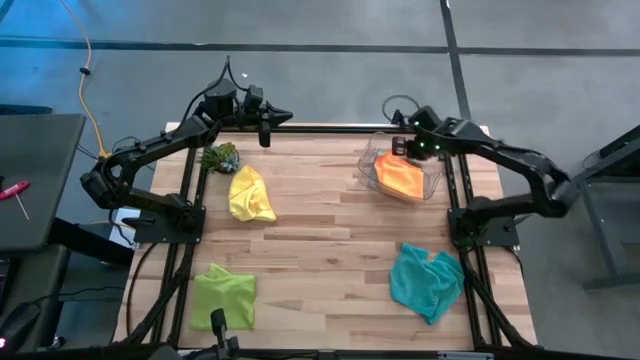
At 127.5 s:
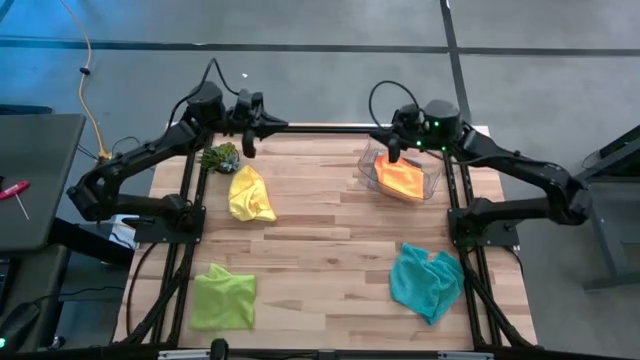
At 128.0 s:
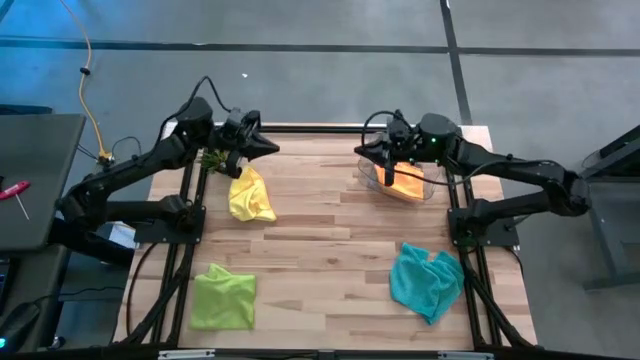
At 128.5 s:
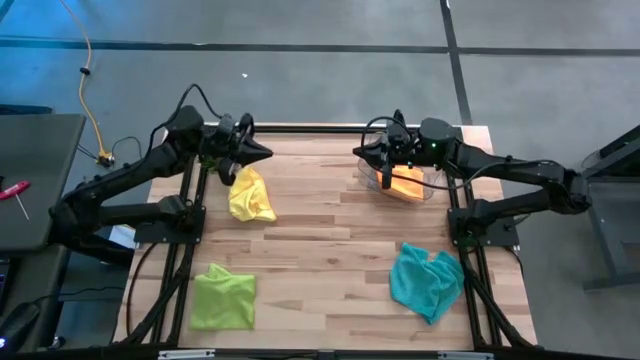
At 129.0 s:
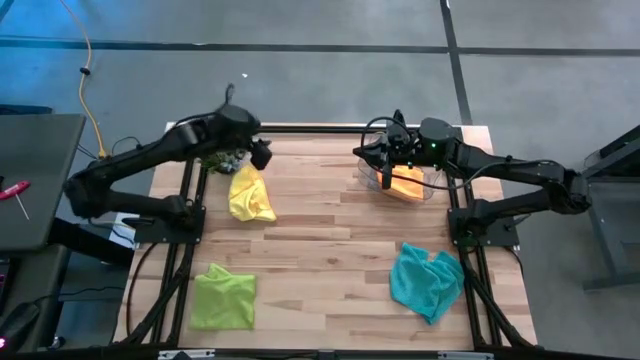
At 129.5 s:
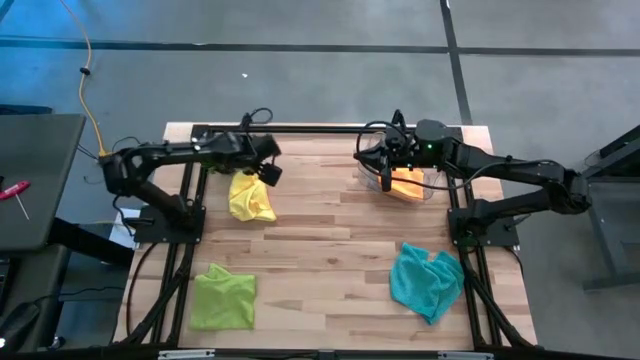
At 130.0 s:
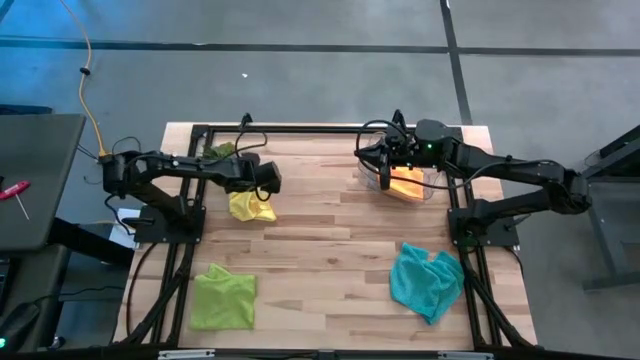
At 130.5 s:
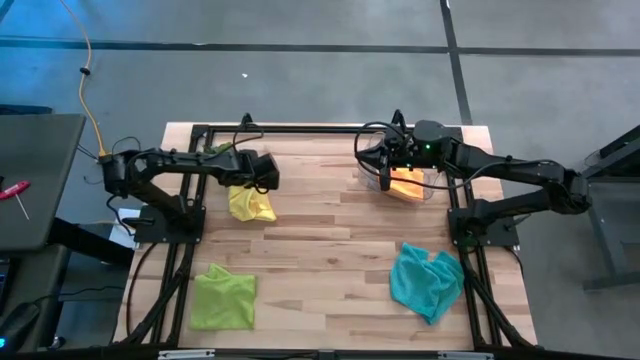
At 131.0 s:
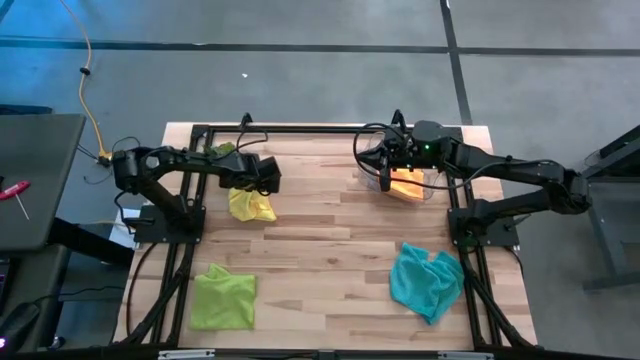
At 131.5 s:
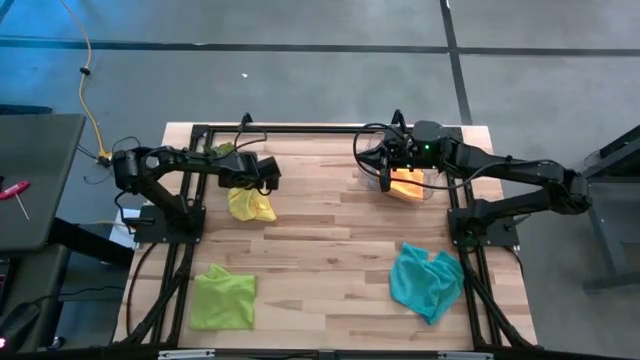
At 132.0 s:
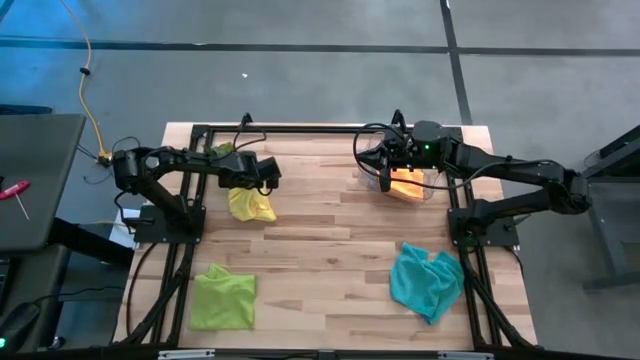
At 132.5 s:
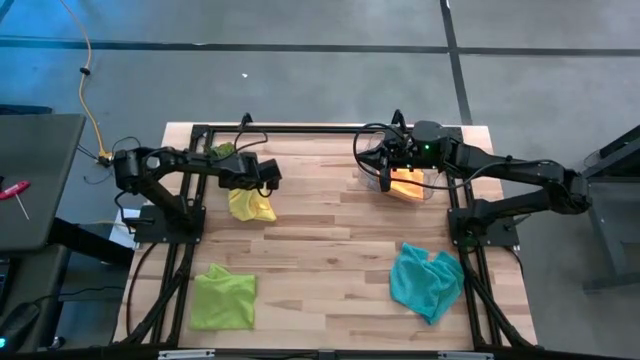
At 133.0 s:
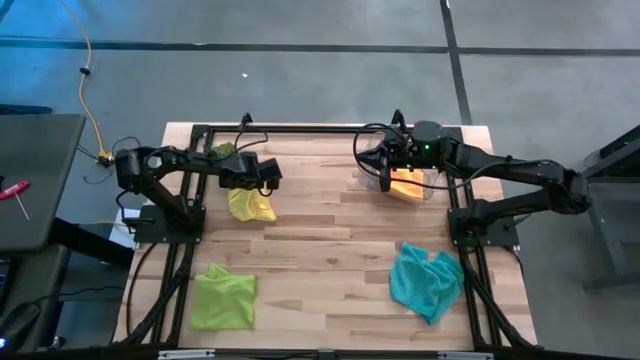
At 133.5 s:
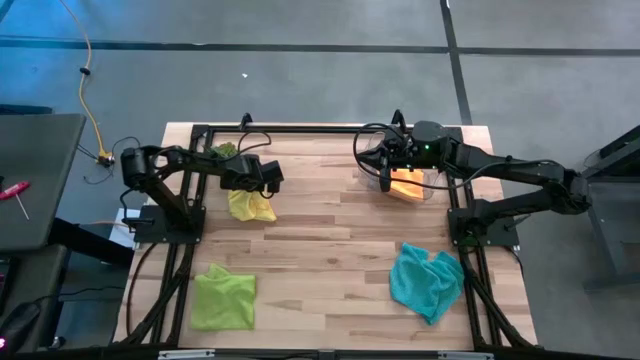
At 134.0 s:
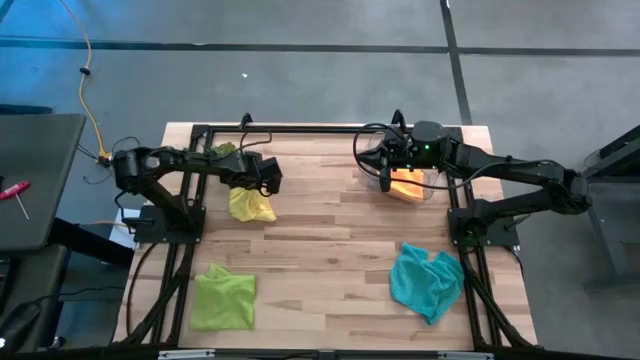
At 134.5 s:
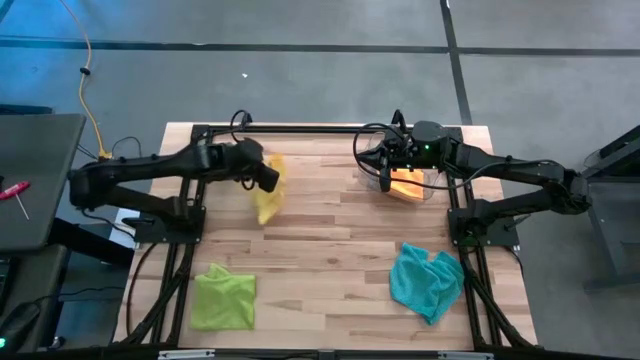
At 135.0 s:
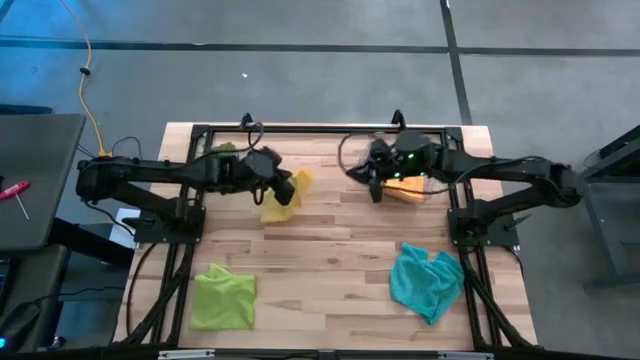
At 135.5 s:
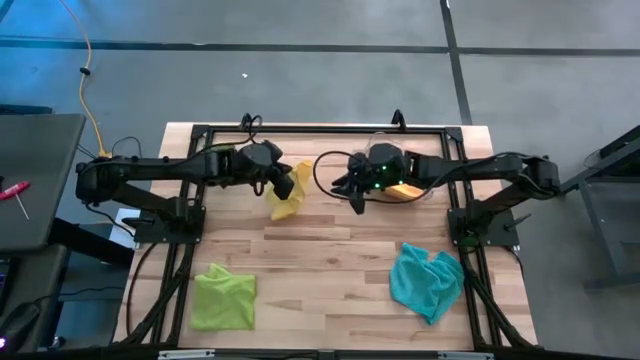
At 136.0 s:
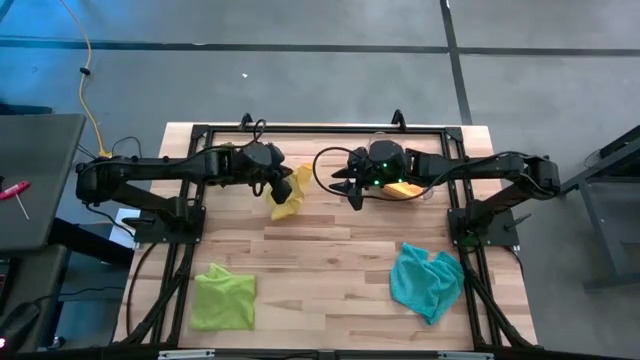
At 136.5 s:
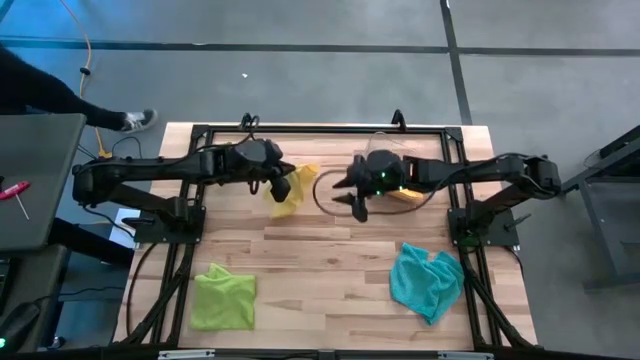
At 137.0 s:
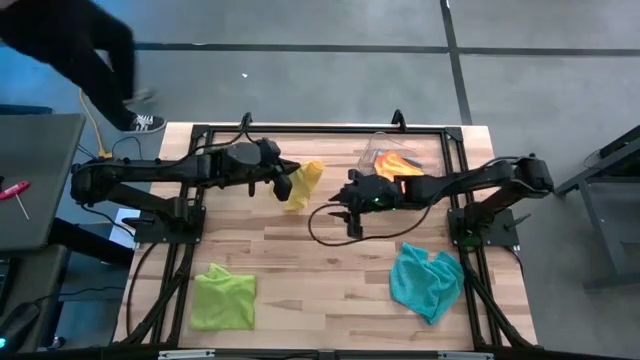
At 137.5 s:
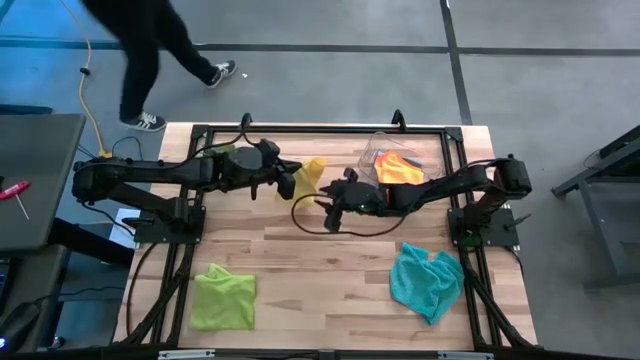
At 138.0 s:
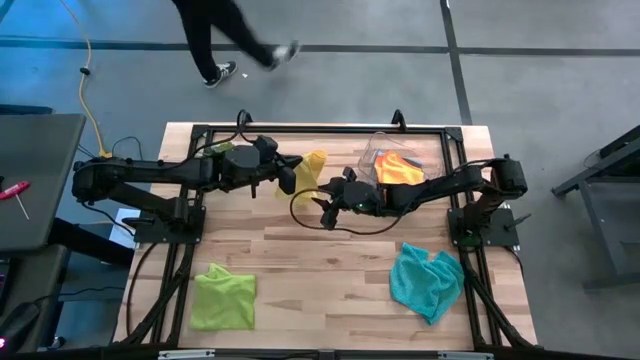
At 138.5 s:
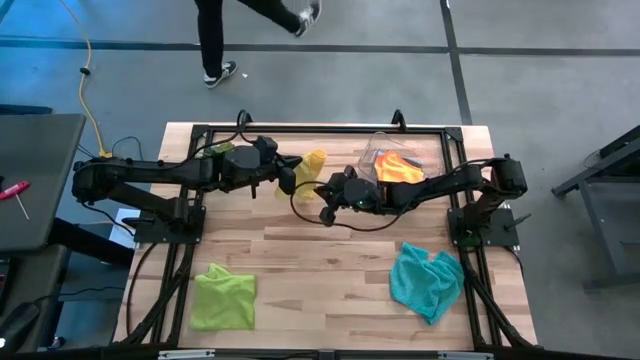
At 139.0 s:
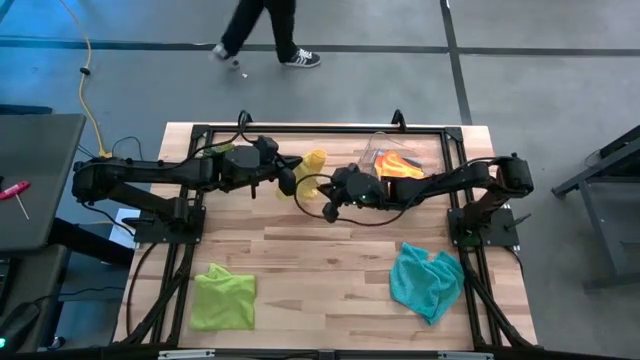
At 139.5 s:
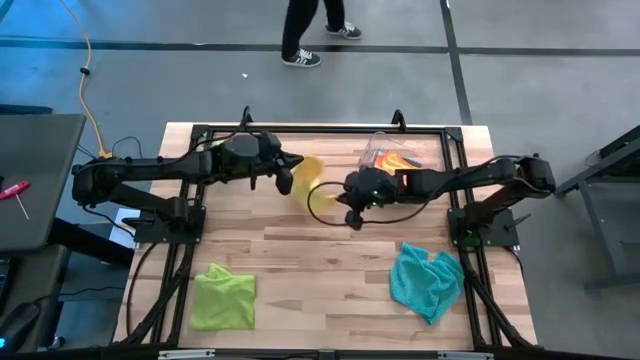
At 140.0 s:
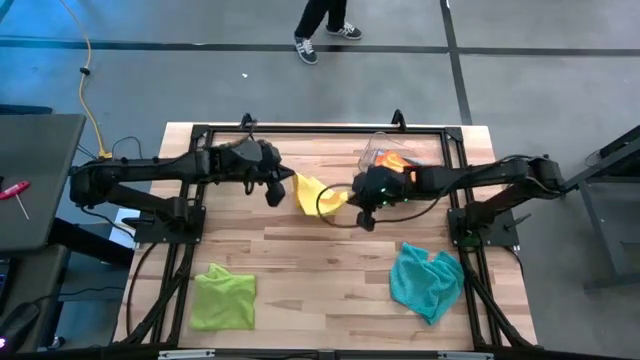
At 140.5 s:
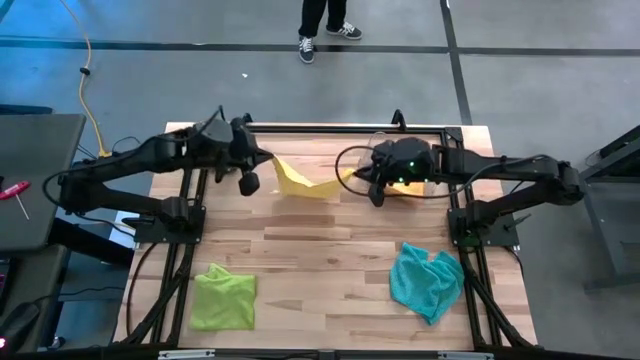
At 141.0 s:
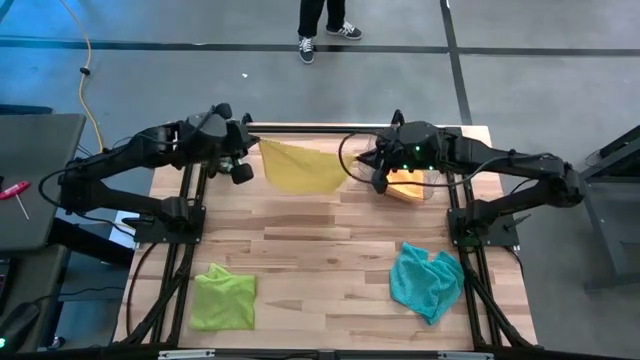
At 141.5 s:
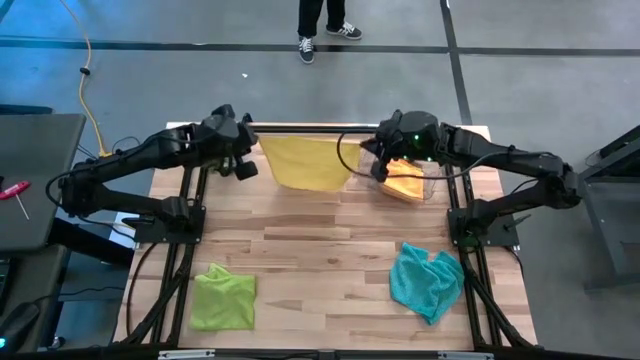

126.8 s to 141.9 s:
Task: Fold microfiber towels
Fold the yellow microfiber towel

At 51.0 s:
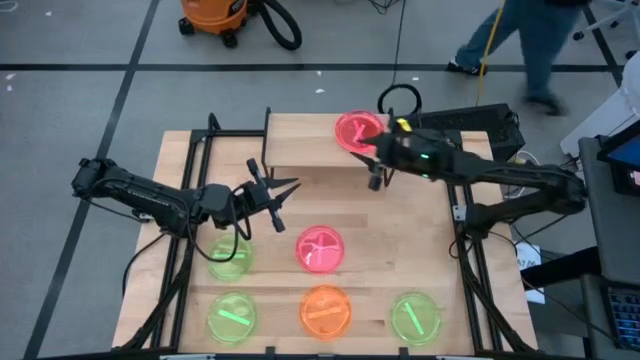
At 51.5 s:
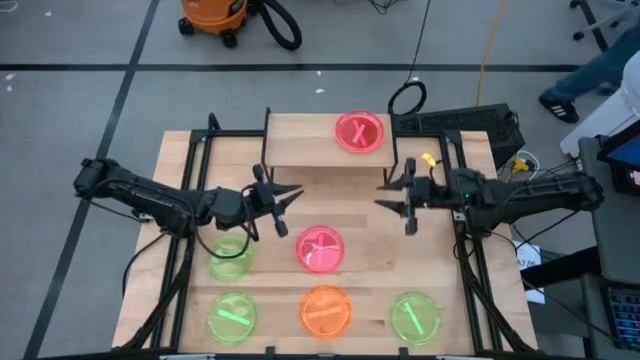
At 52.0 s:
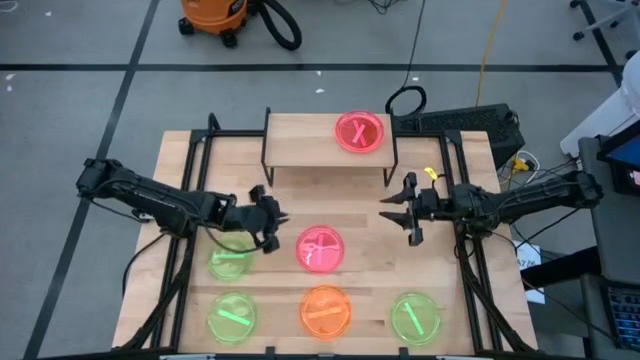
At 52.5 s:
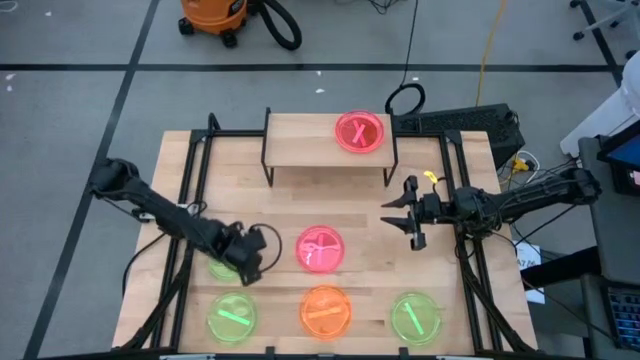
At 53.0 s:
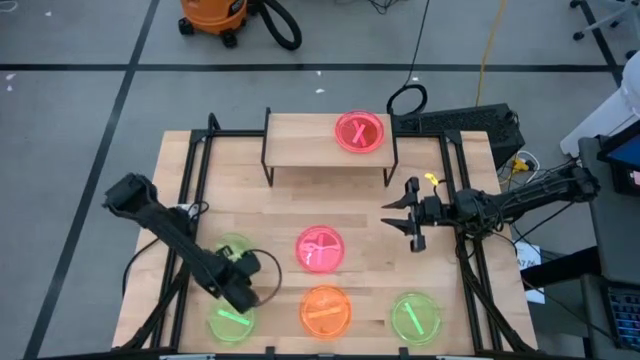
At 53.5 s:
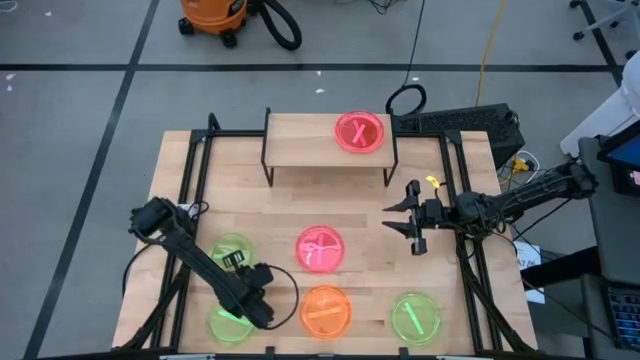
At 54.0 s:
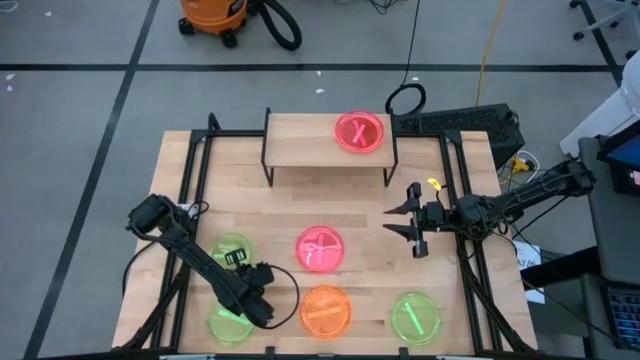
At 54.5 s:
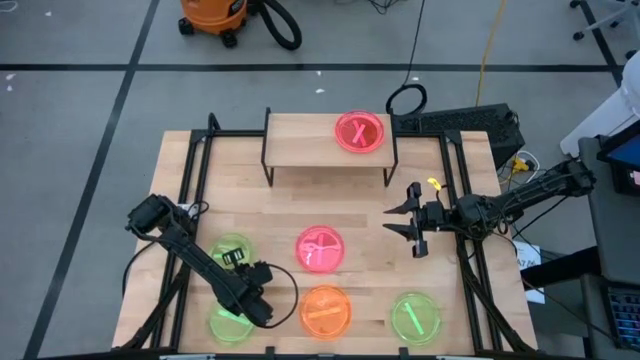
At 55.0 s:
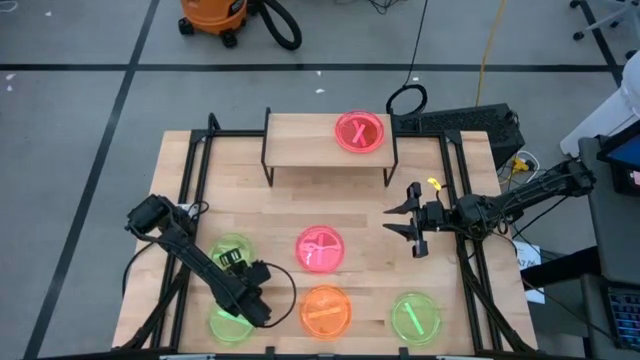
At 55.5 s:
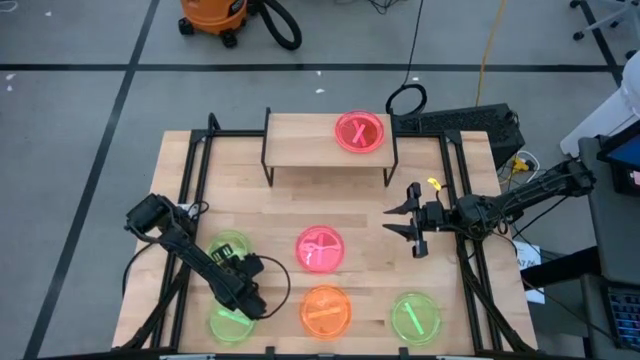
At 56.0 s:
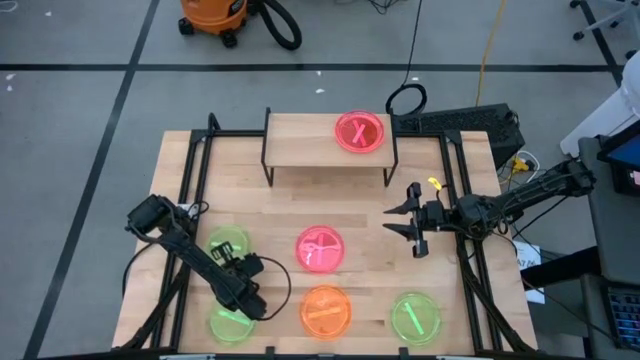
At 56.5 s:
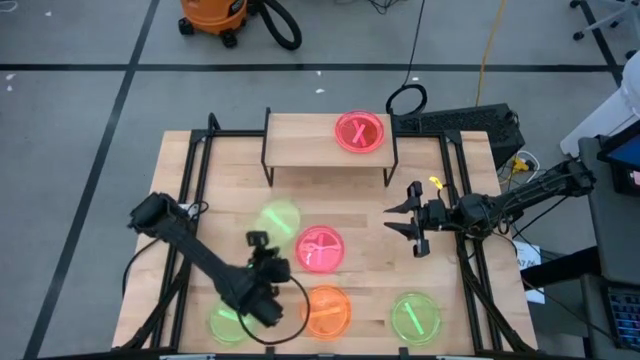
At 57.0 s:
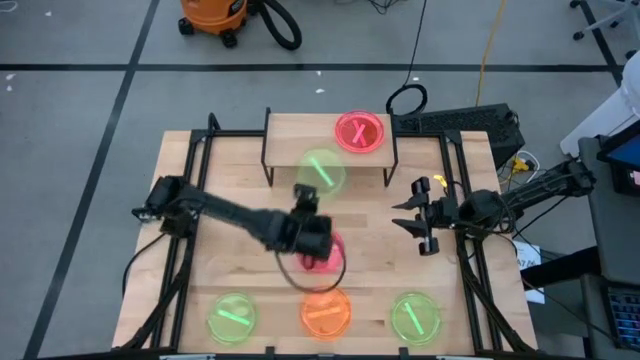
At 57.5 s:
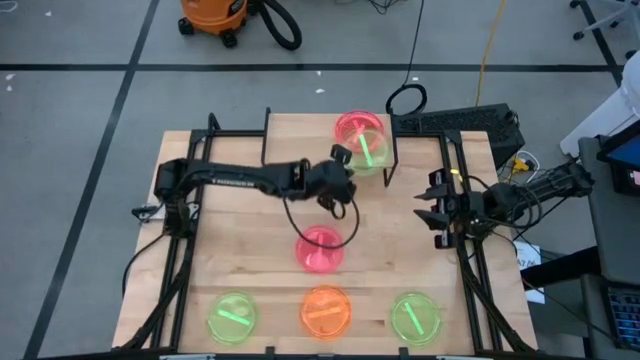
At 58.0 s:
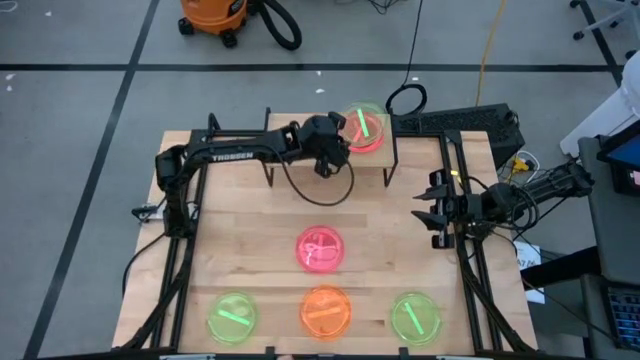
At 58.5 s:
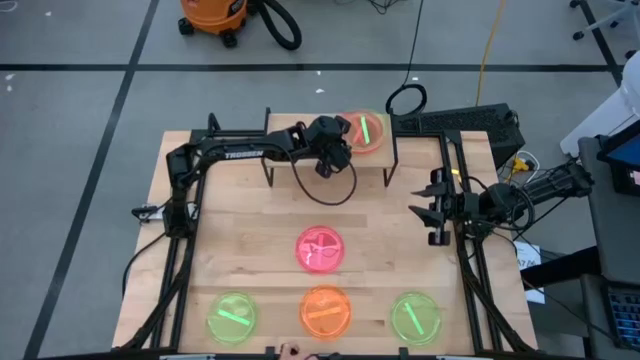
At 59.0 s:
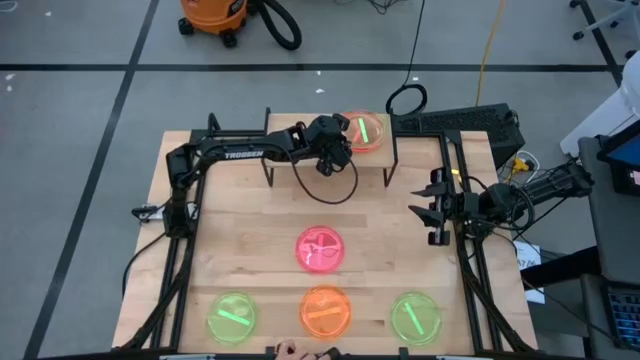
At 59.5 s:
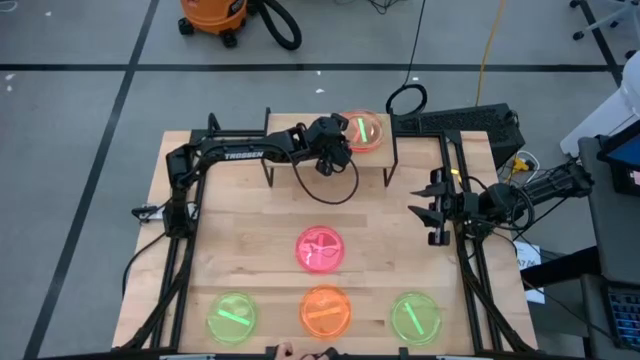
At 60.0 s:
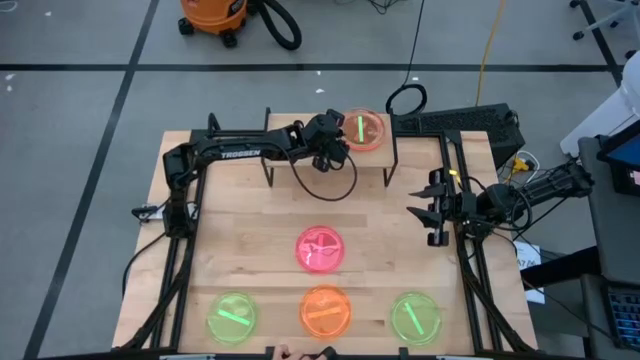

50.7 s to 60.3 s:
Task: Place and stack plates onto a shelf
Stack the green plate on top of the pink plate on the shelf
